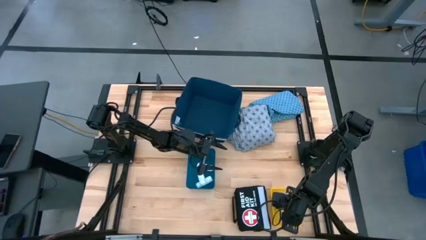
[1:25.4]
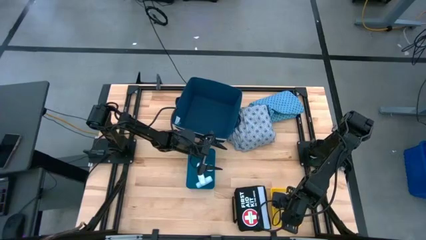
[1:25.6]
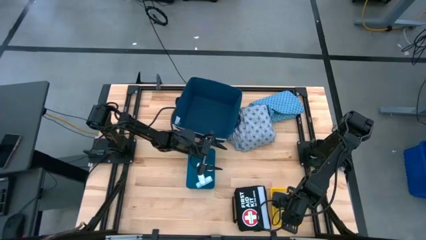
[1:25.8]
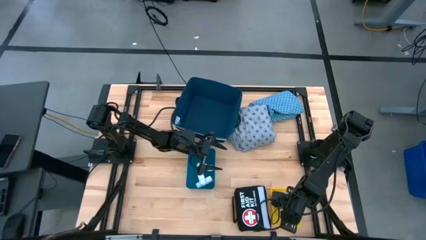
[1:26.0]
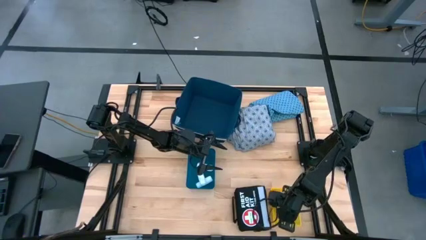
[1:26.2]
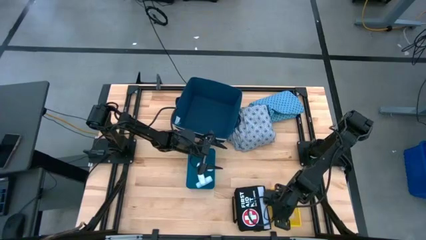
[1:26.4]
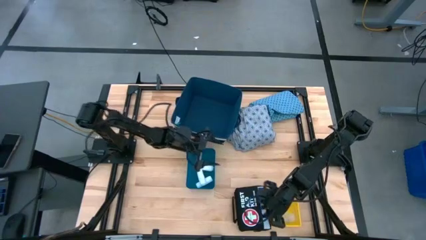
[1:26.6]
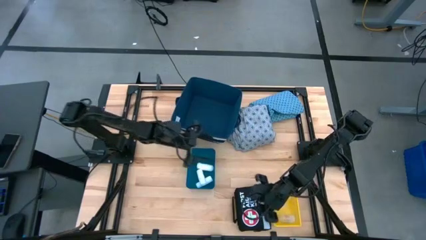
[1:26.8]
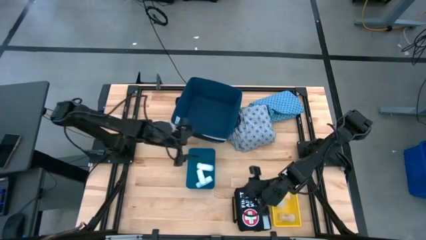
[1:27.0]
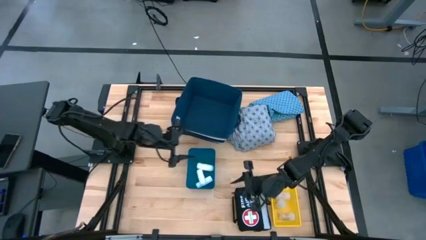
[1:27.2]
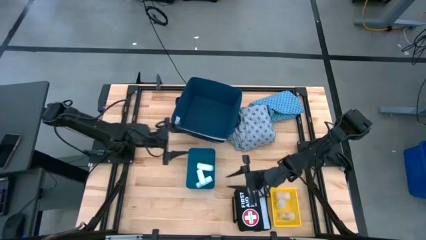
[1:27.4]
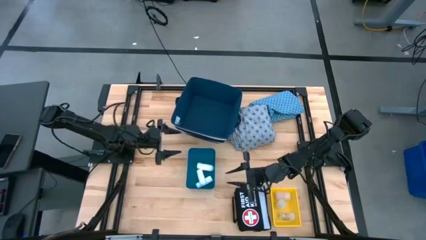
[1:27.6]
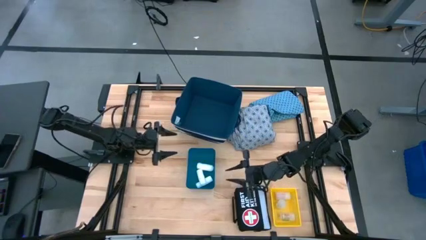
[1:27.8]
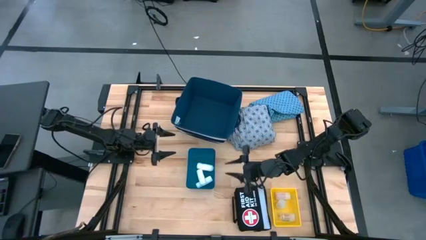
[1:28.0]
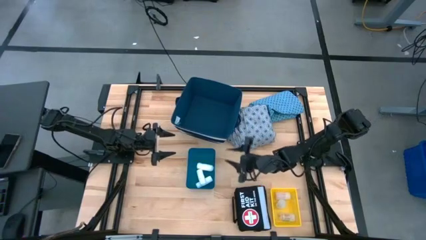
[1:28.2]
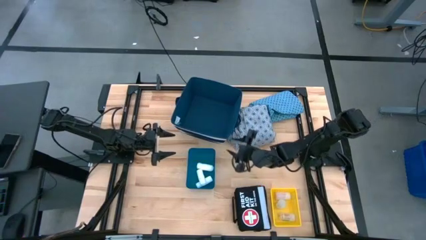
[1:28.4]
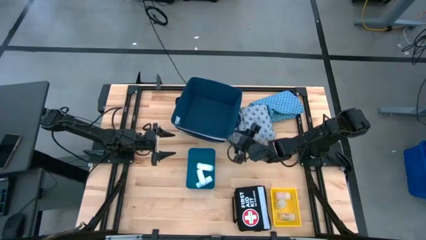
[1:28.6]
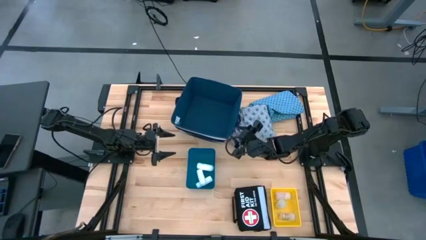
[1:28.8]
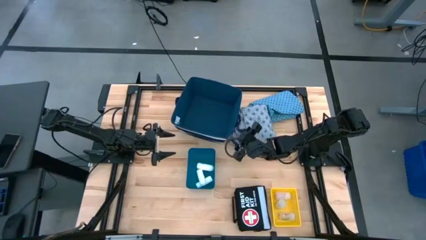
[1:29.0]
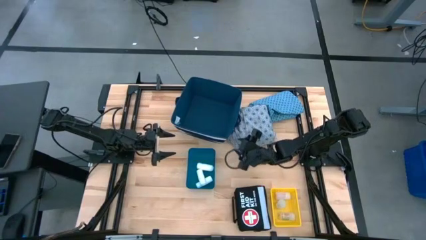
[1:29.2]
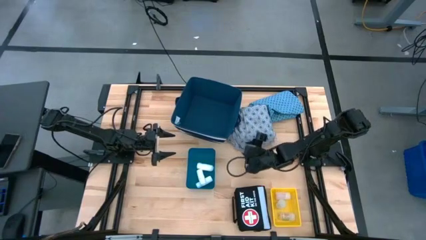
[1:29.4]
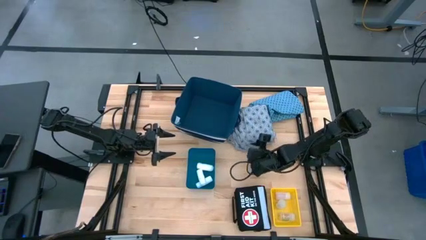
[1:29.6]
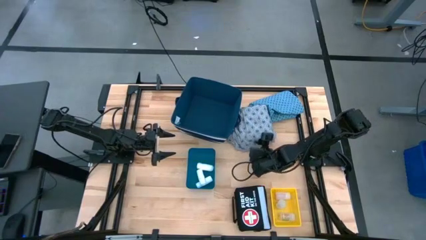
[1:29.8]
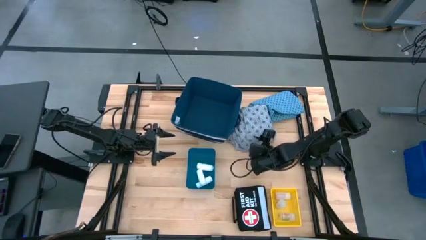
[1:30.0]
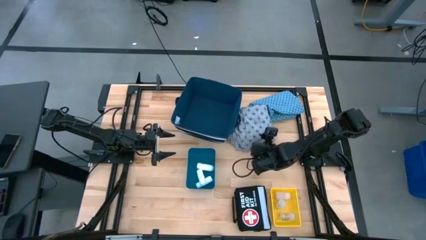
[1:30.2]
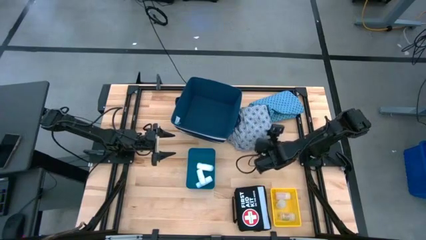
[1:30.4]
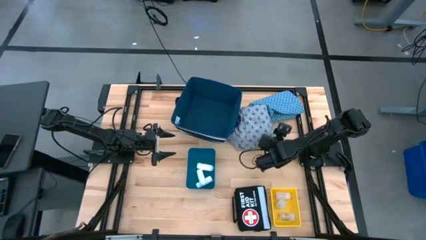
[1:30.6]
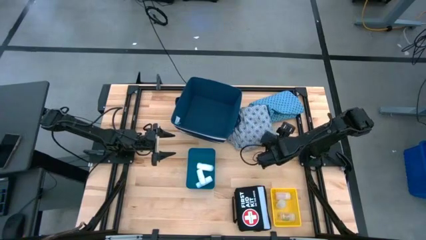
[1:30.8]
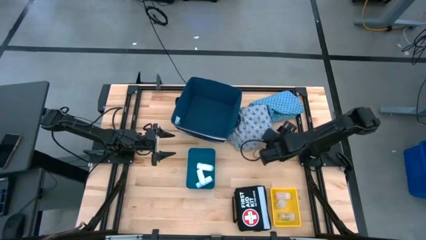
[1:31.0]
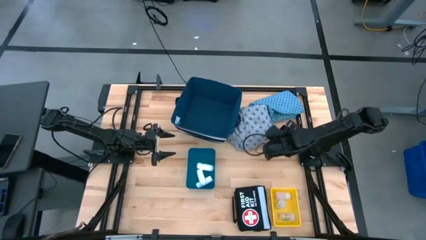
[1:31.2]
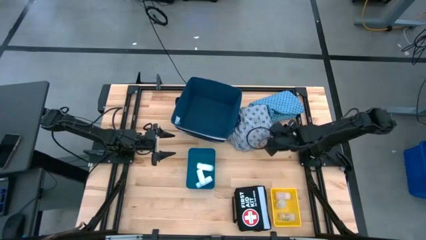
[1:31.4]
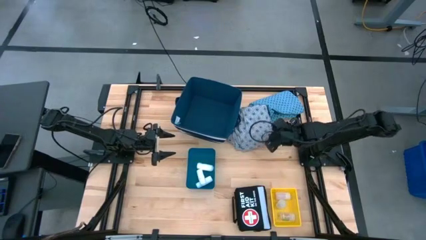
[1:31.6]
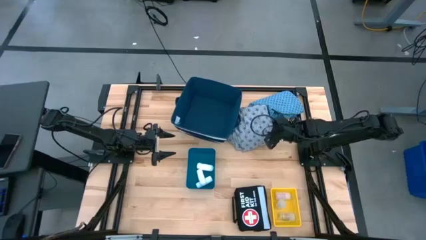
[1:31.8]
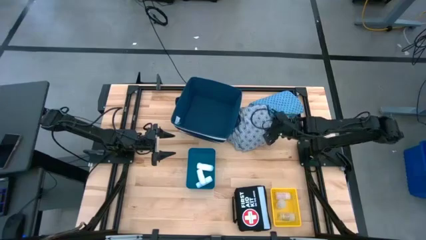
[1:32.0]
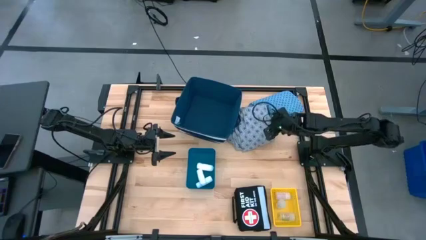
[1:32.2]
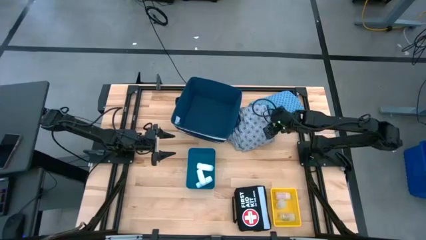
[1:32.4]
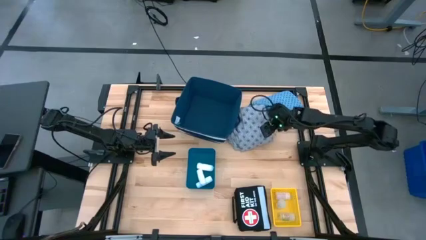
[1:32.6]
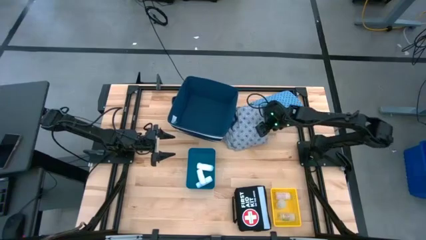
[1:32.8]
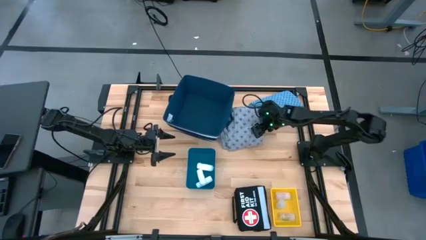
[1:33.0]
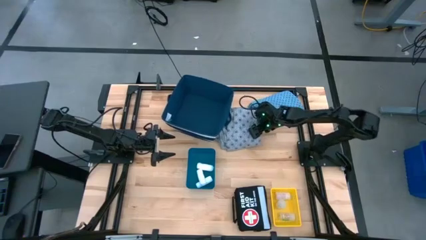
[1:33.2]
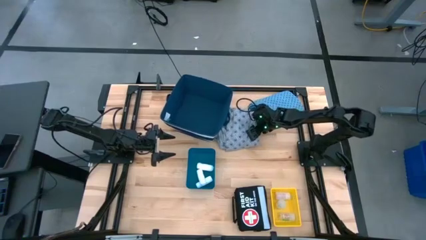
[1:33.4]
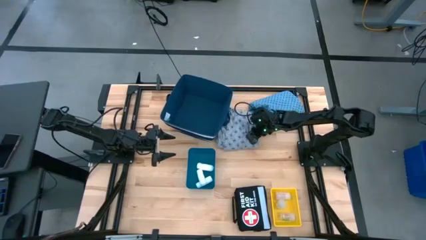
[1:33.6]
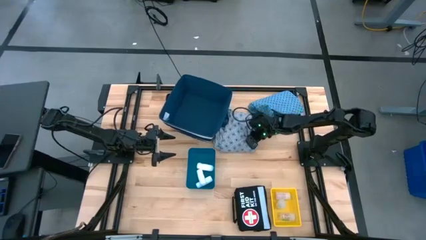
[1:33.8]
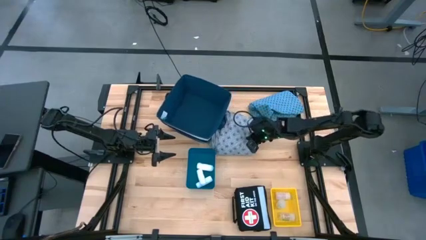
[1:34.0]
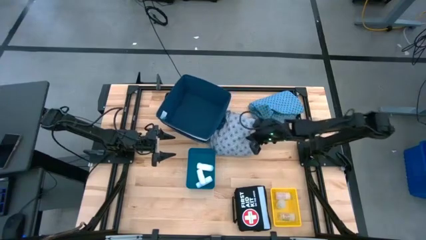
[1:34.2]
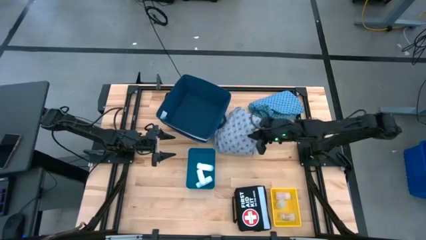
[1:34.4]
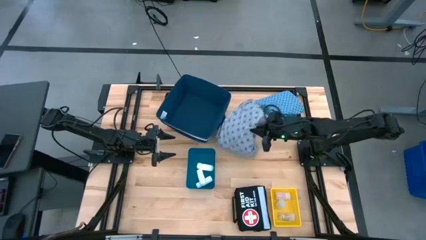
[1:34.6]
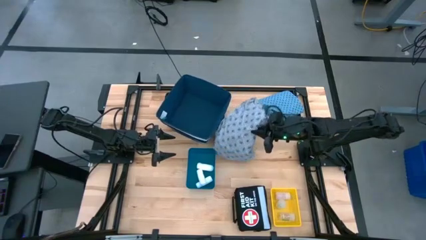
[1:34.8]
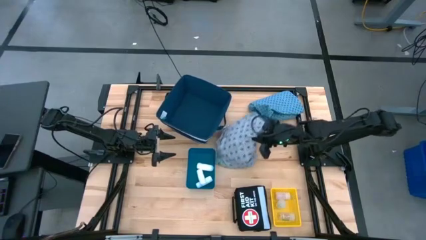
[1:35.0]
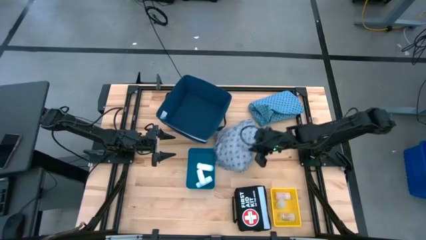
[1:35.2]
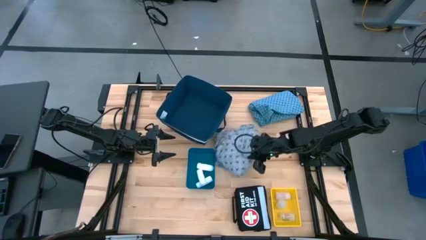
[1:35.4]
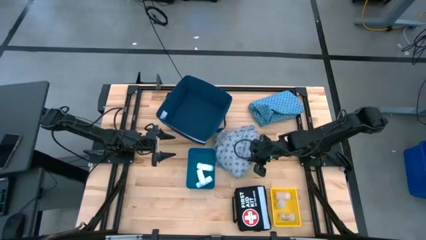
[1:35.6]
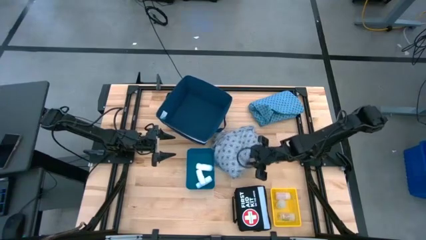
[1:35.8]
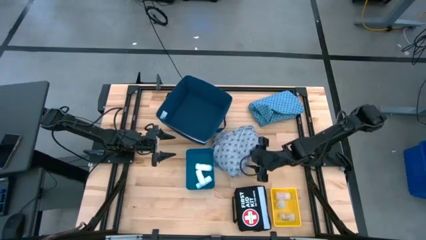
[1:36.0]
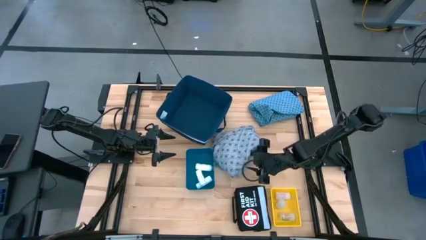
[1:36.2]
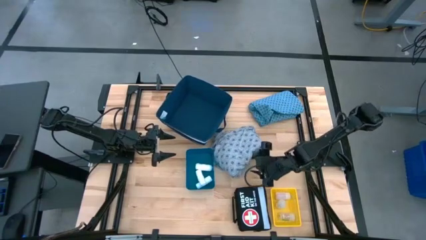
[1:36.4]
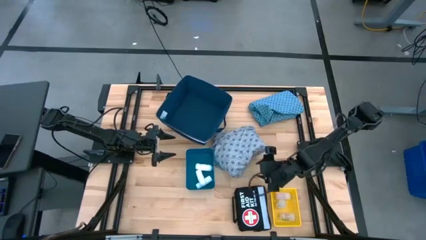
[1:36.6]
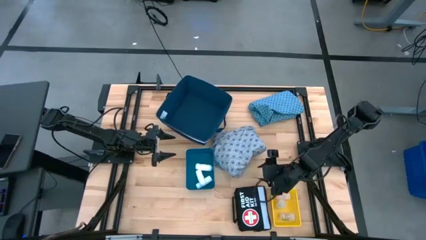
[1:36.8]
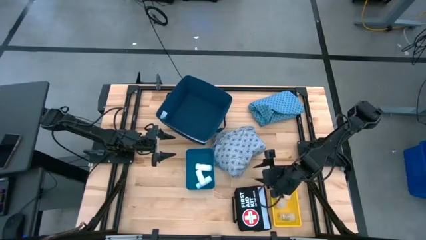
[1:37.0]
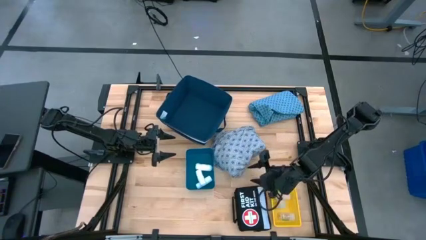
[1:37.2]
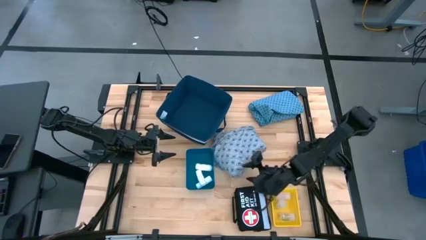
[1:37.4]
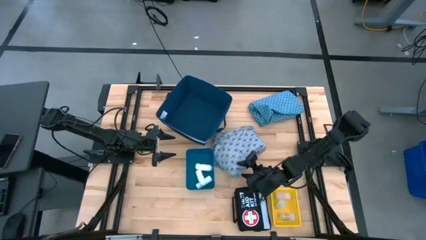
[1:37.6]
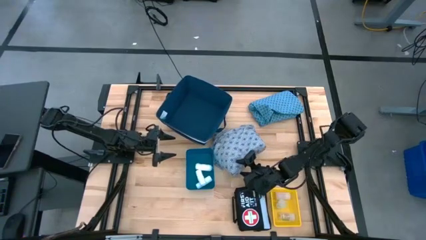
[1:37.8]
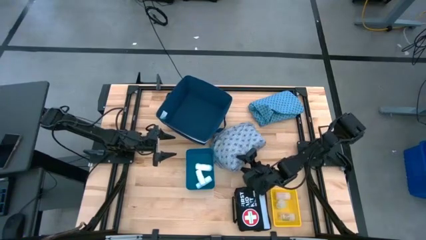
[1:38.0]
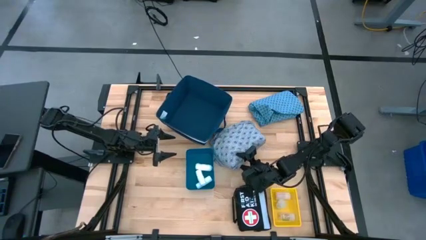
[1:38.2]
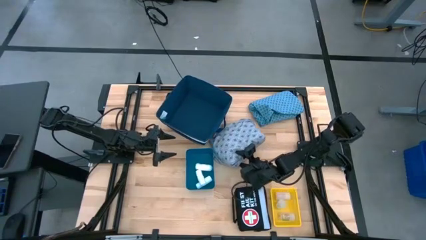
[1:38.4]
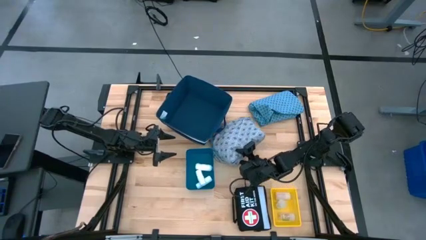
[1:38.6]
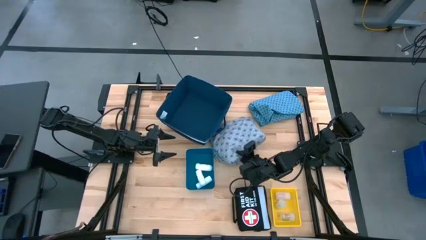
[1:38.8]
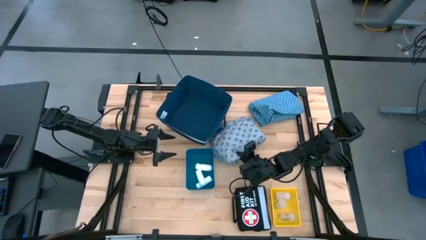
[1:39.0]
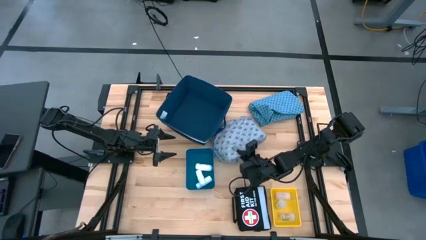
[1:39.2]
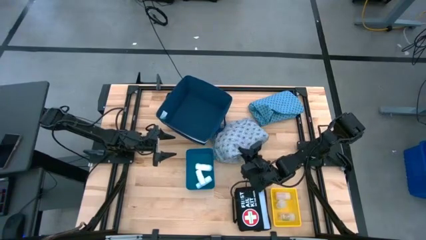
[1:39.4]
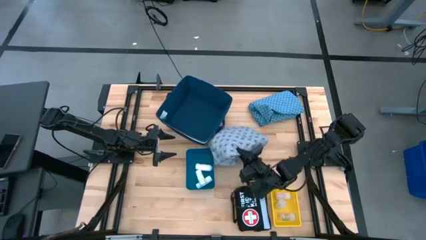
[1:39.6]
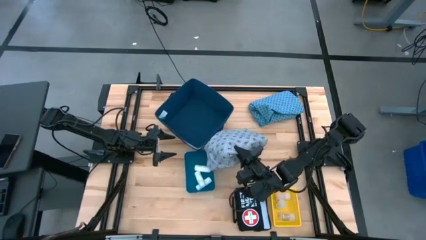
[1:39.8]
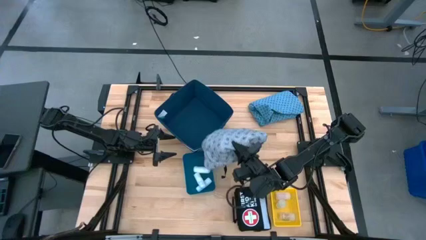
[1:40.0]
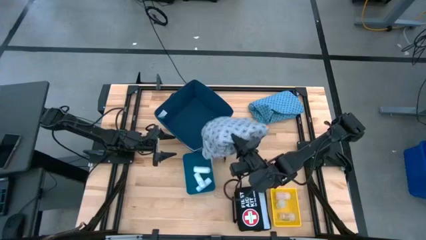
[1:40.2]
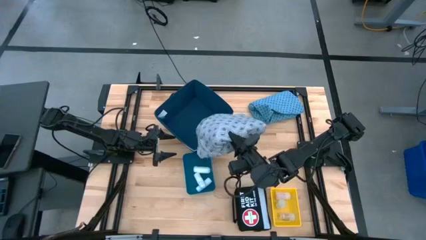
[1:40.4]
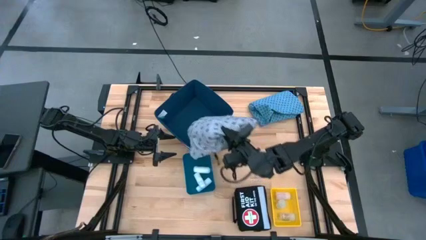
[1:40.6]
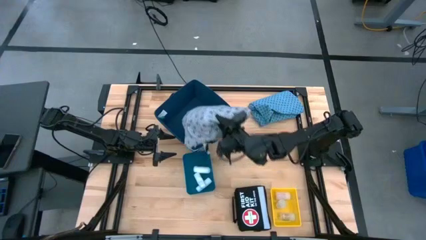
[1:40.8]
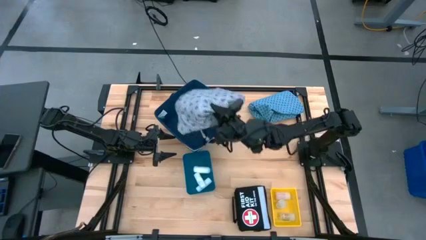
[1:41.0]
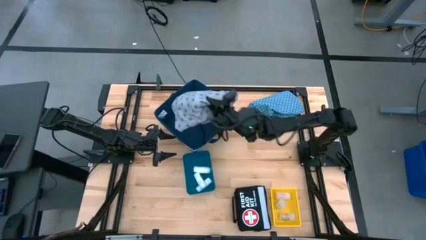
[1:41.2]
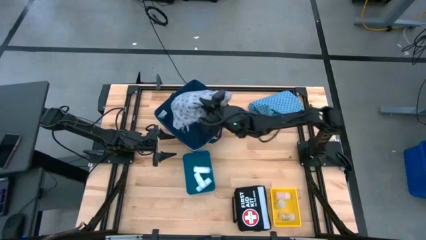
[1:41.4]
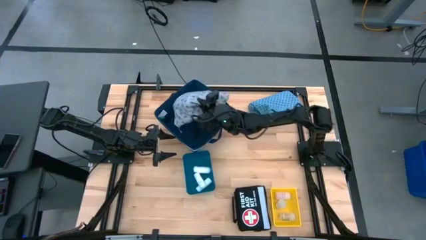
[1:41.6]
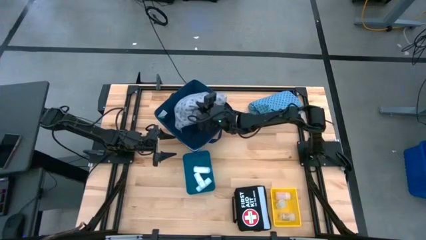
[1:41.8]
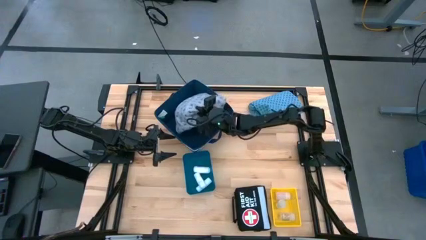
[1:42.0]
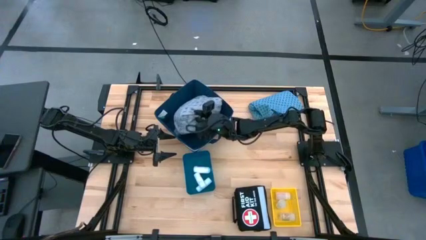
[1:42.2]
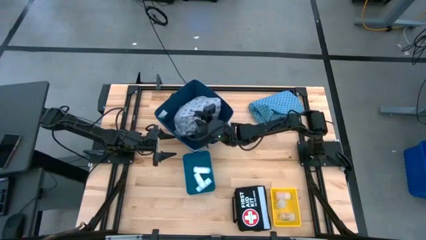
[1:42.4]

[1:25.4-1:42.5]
Task: Pick & place medical supplies in basket/bin
Put the gray gown in the blue bin
